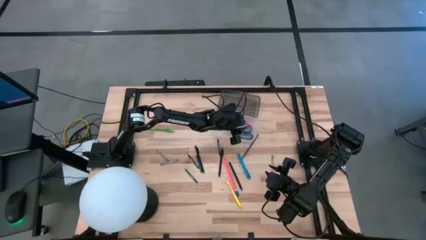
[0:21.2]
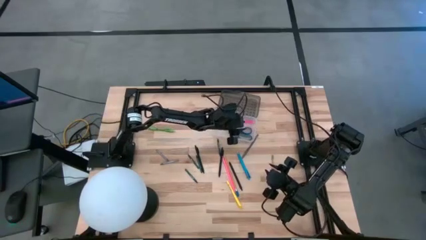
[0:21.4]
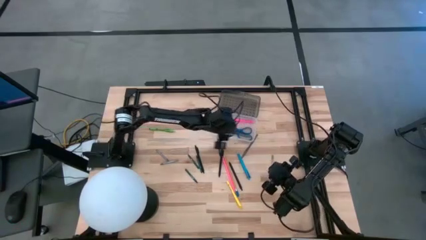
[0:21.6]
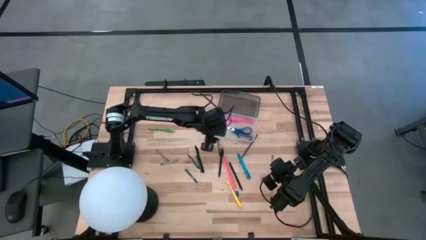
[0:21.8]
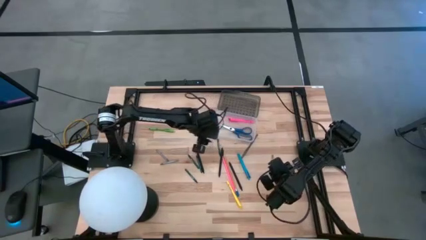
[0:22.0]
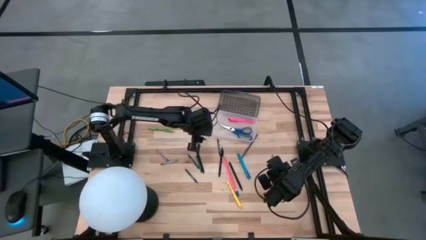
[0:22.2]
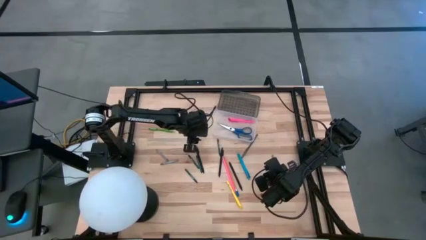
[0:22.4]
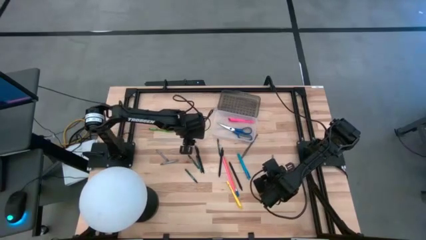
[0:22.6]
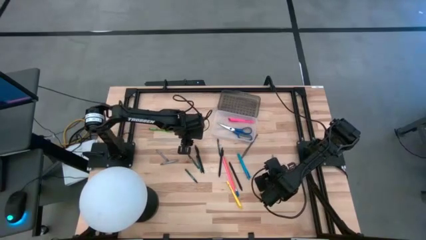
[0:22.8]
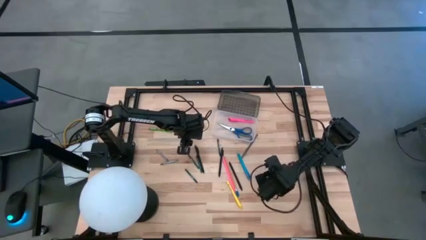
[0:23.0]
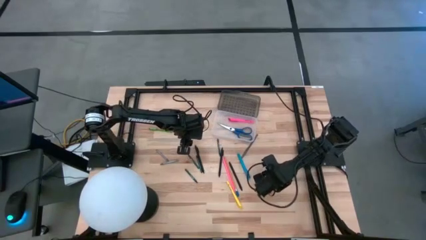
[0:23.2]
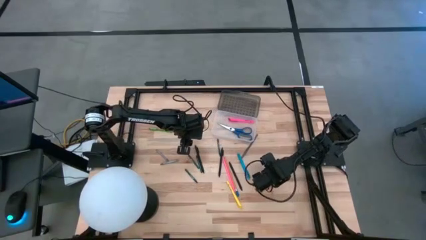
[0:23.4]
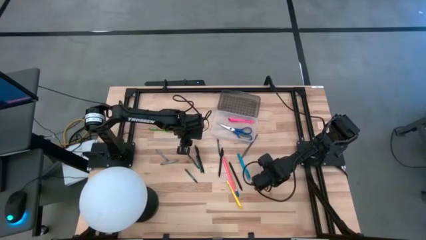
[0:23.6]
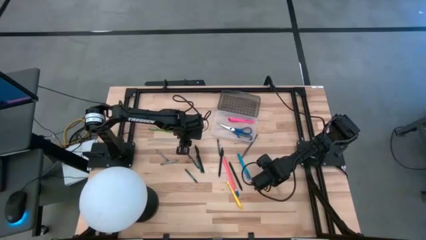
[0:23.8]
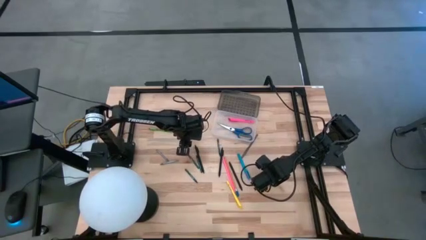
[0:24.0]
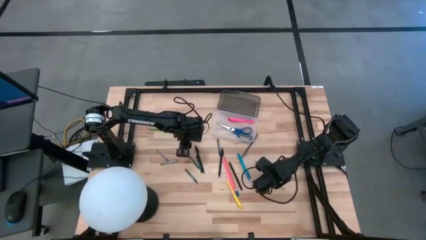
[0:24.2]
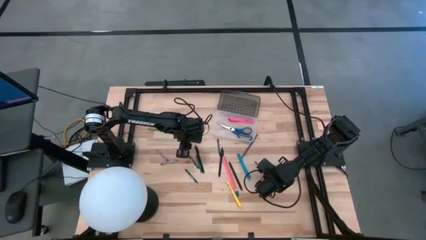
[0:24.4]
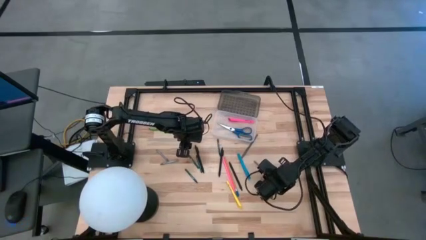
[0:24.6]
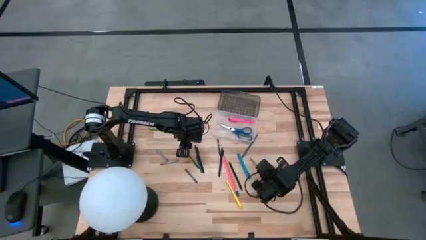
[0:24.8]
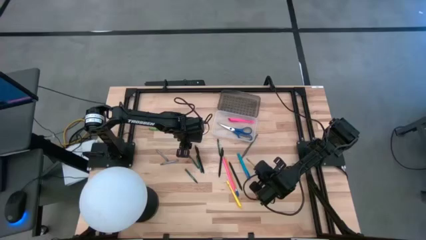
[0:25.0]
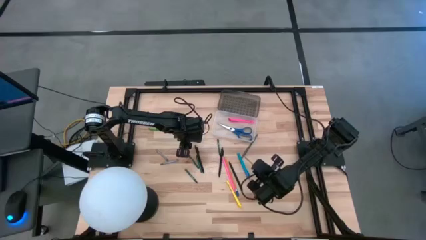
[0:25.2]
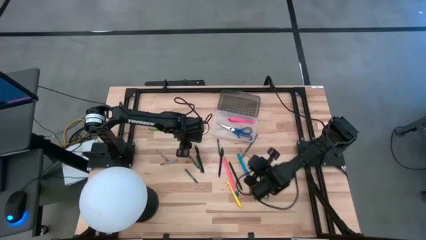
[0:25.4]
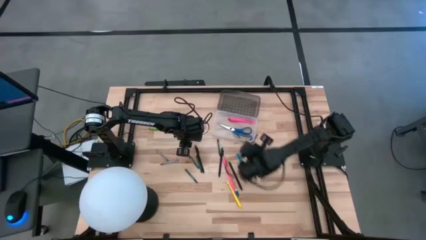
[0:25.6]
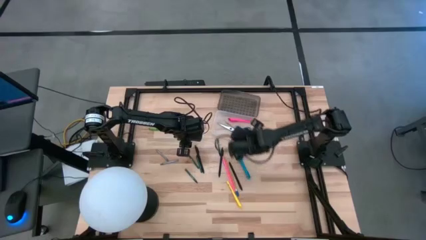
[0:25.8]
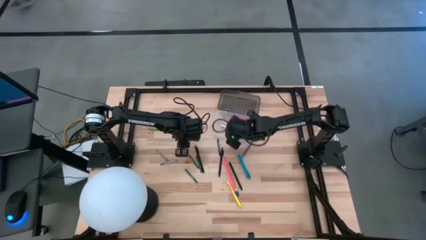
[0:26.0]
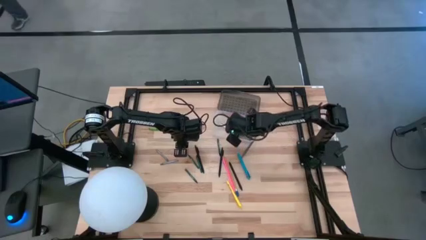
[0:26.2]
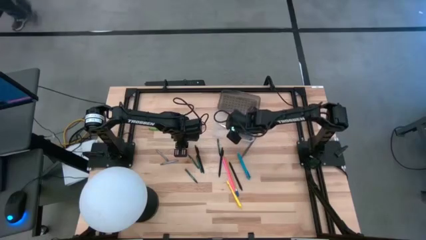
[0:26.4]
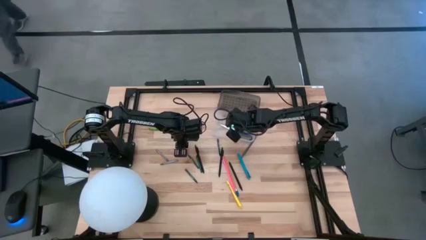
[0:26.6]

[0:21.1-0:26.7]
Task: Pick & place school supplies into a supply box
Put the yellow pencil into the black supply box

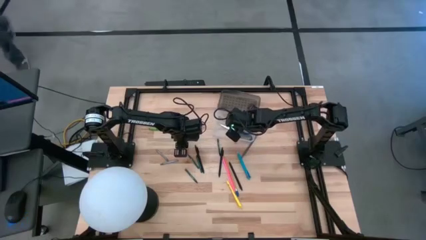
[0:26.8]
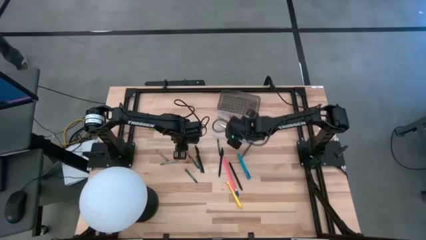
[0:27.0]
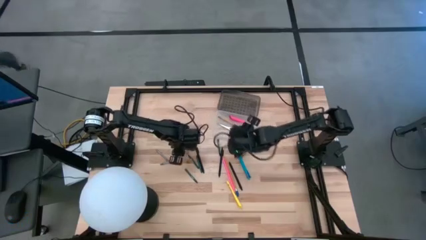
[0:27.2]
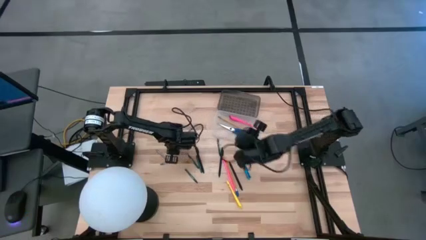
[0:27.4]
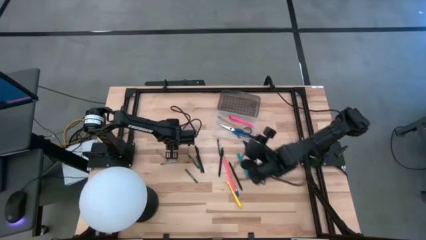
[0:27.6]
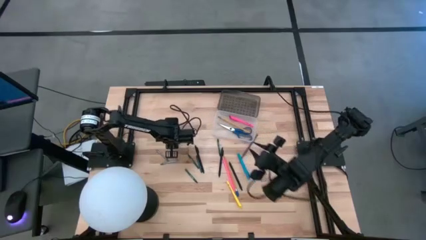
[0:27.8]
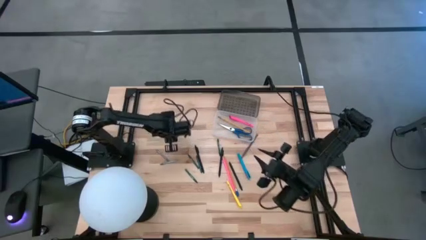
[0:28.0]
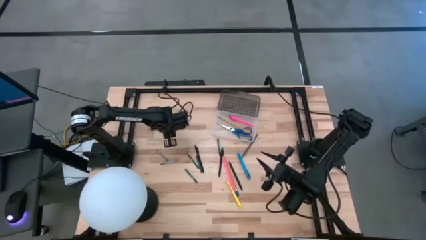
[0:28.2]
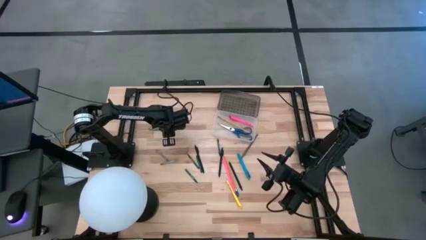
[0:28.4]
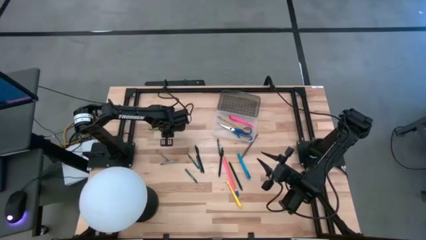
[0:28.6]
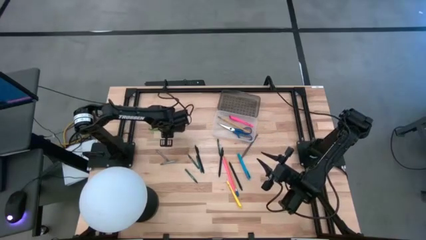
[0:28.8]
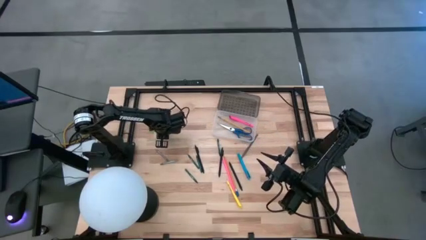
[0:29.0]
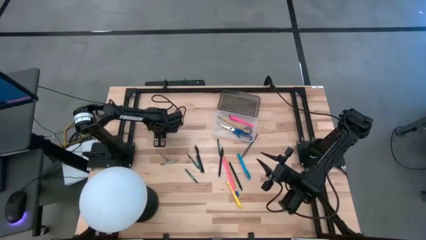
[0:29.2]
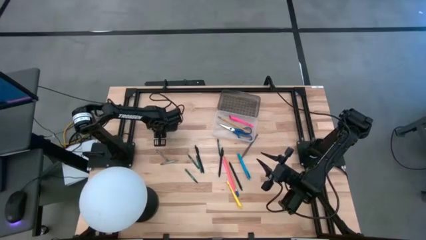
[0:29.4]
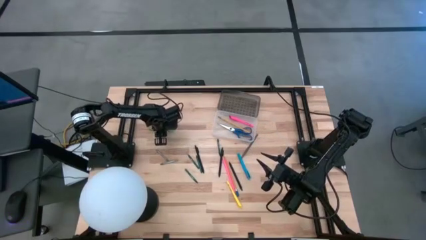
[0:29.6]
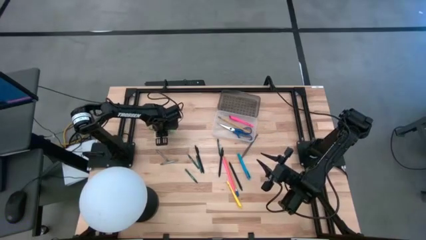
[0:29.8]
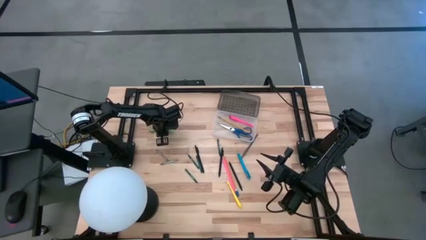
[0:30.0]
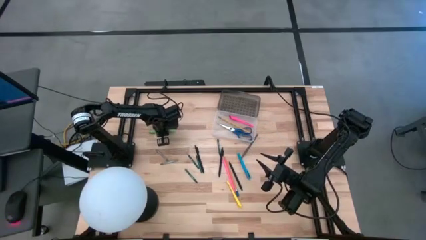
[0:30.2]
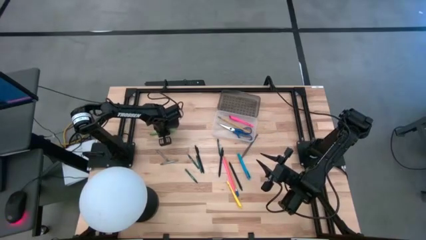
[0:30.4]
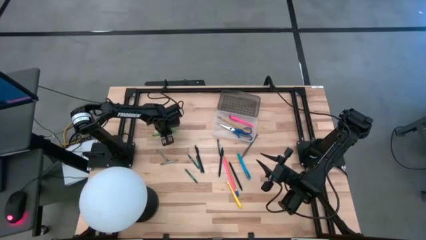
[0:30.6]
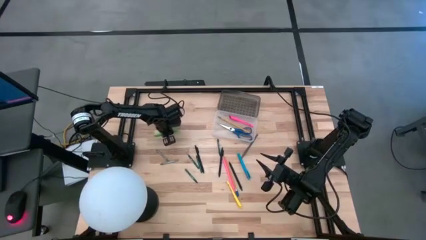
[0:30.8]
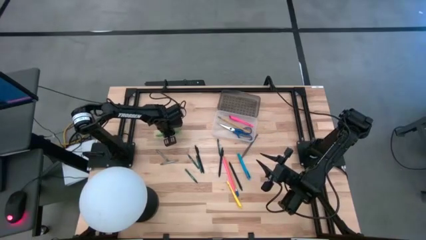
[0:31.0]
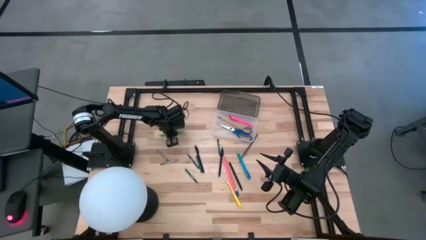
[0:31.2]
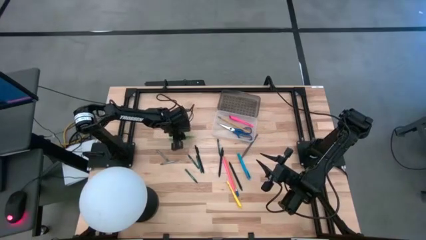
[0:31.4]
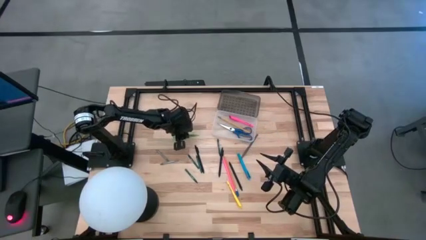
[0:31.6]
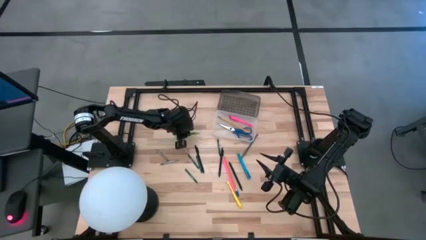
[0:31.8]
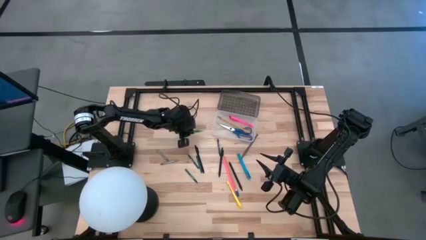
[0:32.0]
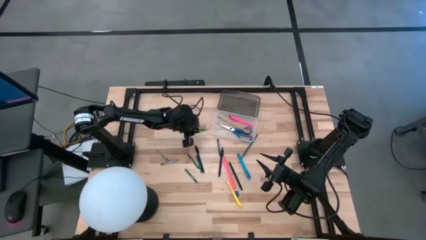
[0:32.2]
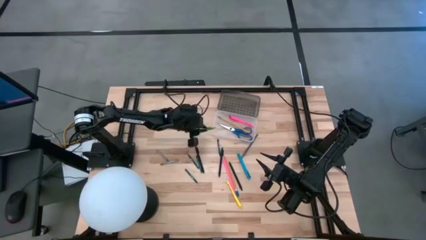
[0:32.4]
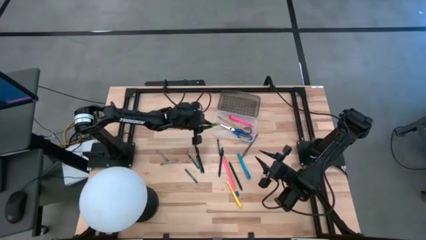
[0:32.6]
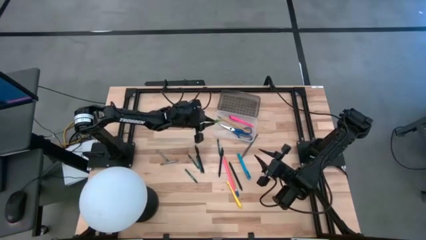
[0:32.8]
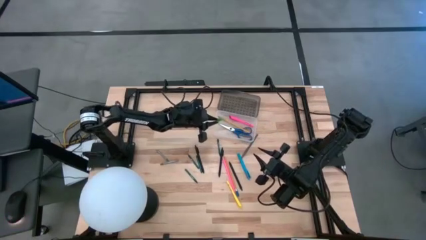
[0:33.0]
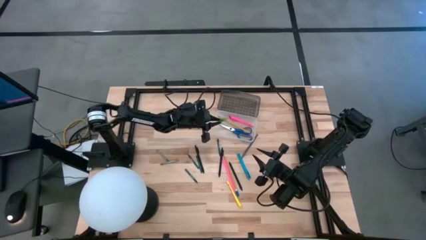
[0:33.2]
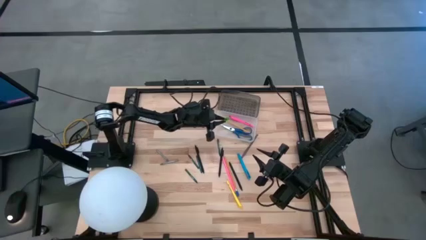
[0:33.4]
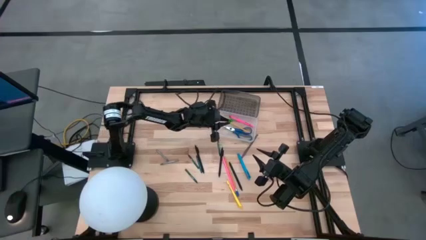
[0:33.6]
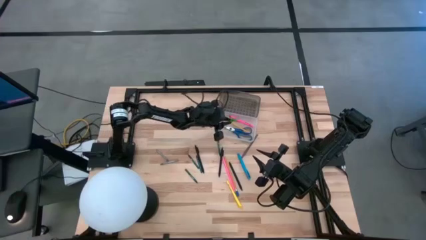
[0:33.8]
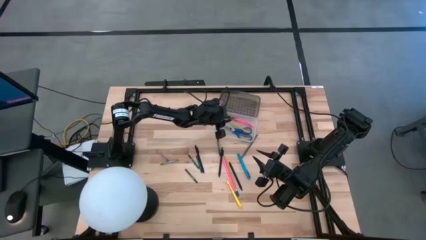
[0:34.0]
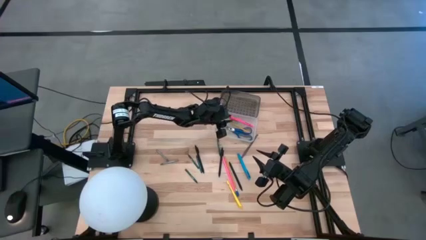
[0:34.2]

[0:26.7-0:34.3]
Put the green pen into the black supply box

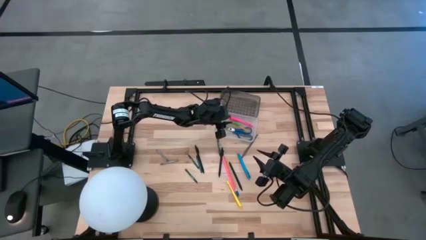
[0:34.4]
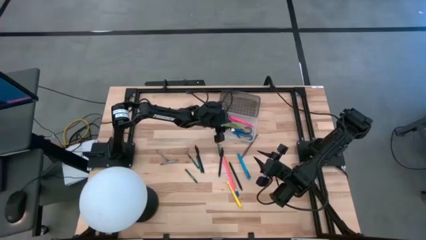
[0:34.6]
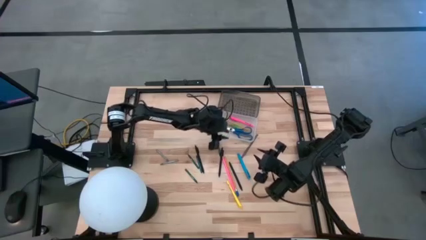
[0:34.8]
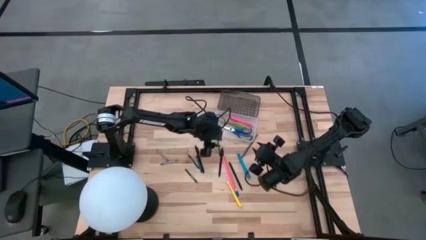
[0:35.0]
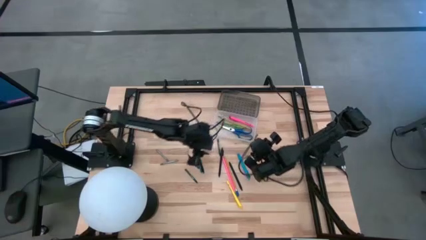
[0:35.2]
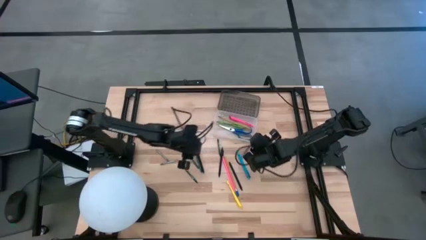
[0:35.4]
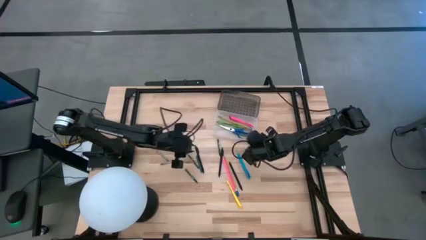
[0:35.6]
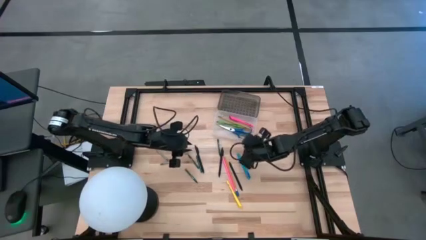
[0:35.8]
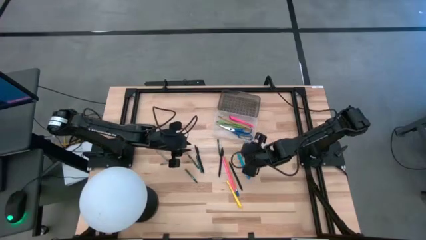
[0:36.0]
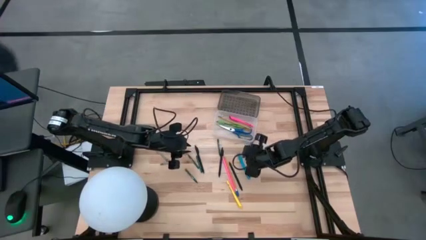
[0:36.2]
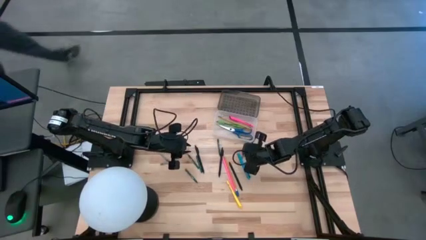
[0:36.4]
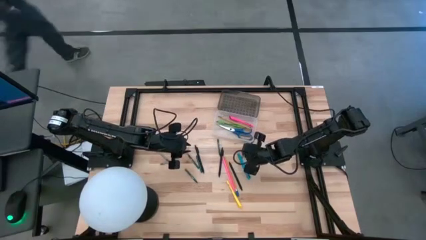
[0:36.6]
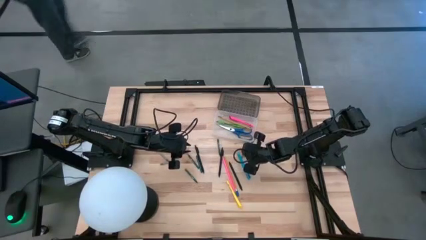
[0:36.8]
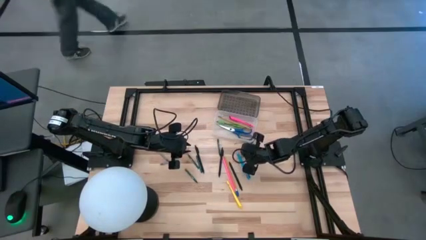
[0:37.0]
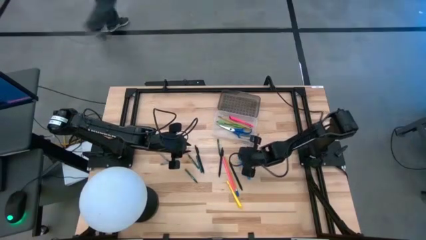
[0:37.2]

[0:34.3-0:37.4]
Put the gray pen into the black supply box
